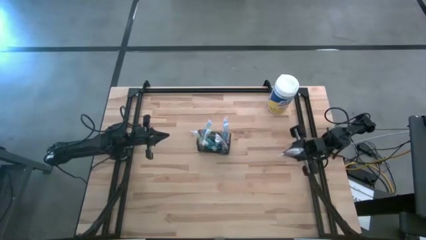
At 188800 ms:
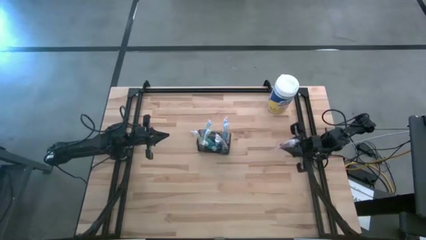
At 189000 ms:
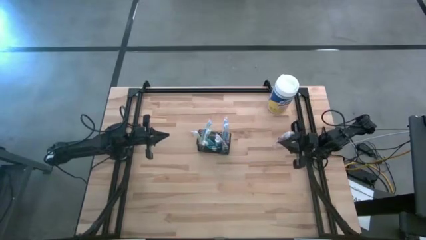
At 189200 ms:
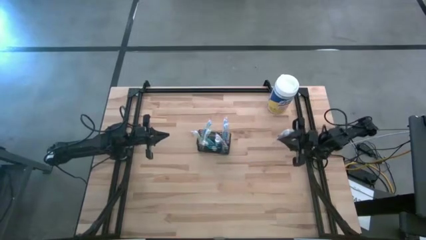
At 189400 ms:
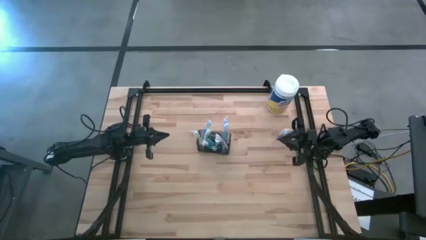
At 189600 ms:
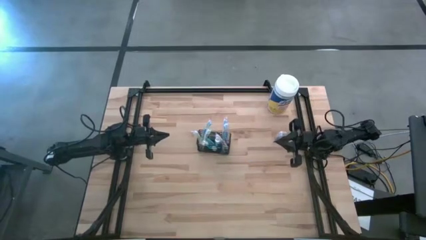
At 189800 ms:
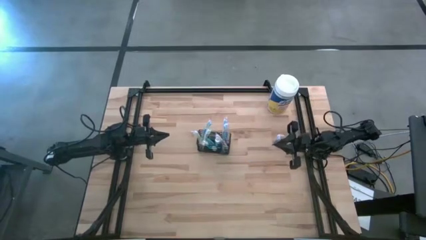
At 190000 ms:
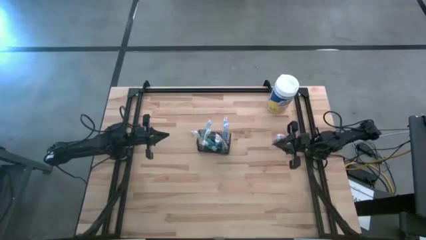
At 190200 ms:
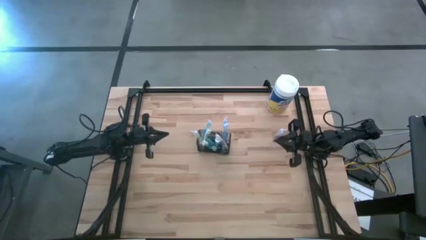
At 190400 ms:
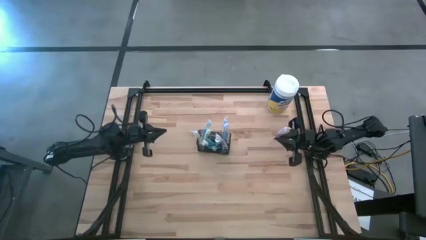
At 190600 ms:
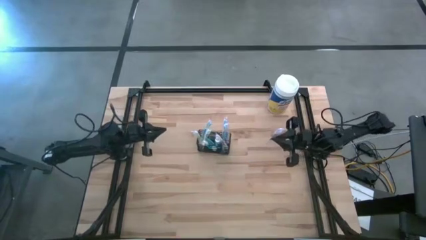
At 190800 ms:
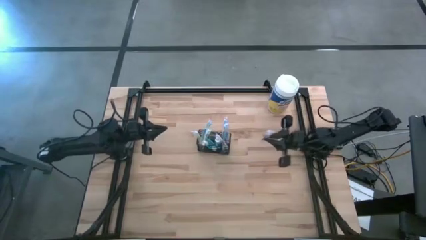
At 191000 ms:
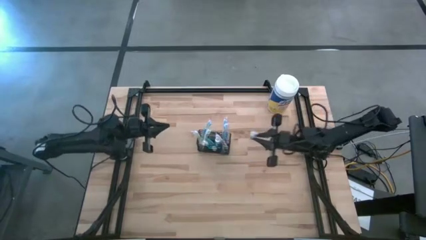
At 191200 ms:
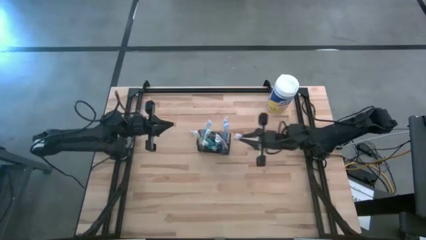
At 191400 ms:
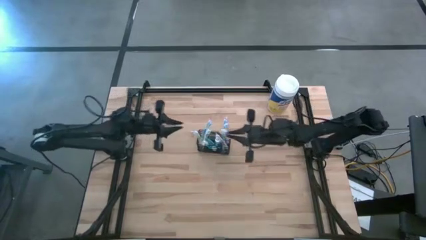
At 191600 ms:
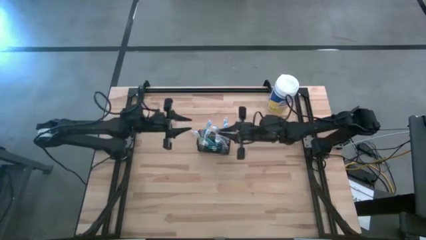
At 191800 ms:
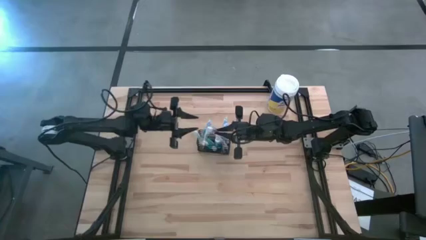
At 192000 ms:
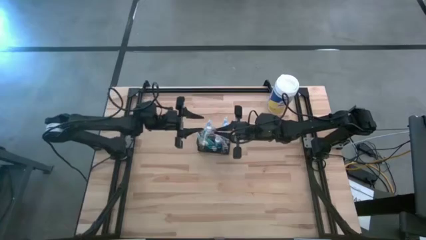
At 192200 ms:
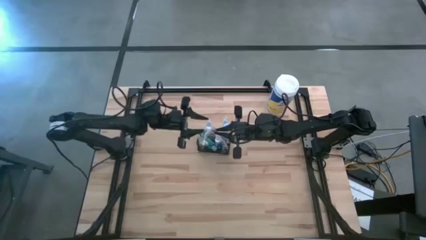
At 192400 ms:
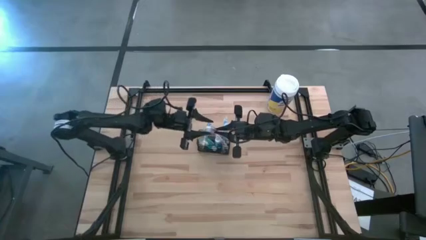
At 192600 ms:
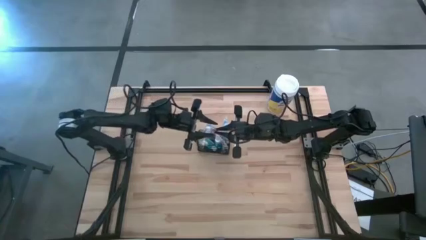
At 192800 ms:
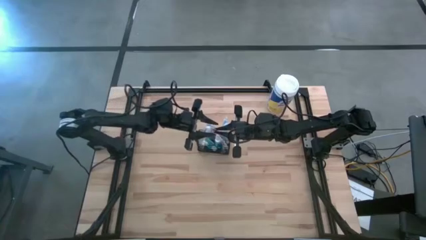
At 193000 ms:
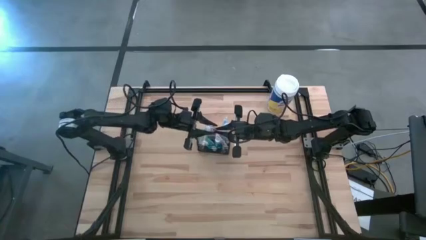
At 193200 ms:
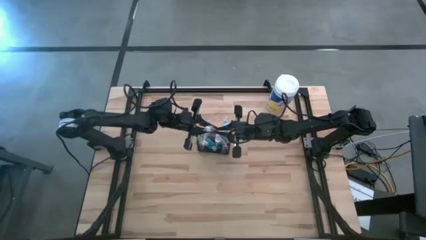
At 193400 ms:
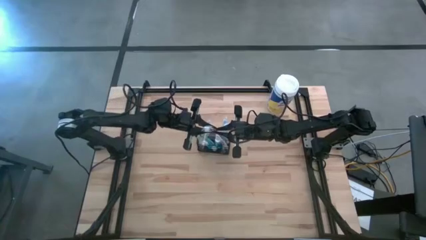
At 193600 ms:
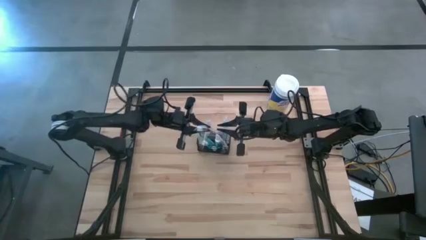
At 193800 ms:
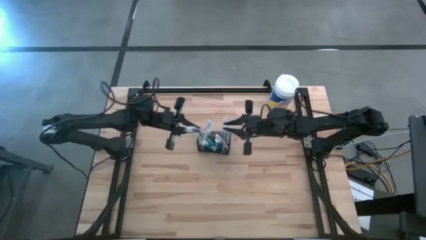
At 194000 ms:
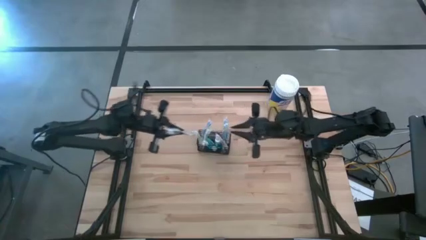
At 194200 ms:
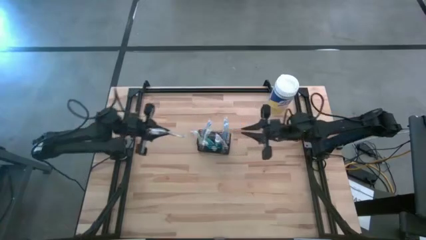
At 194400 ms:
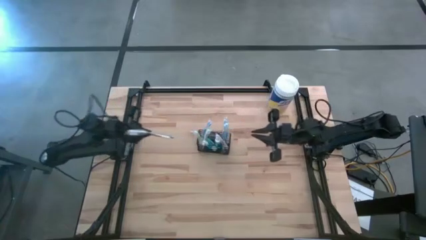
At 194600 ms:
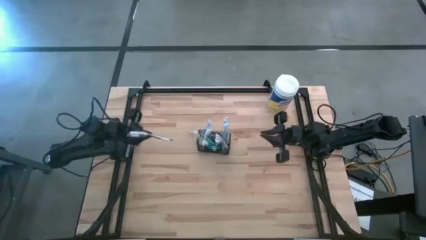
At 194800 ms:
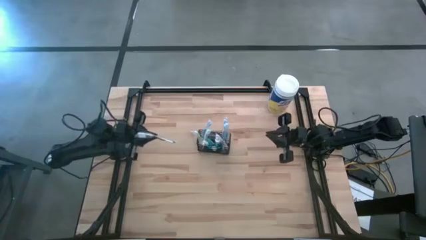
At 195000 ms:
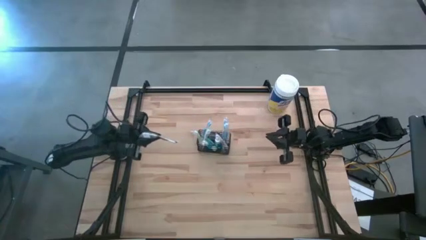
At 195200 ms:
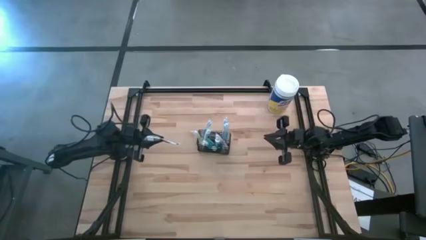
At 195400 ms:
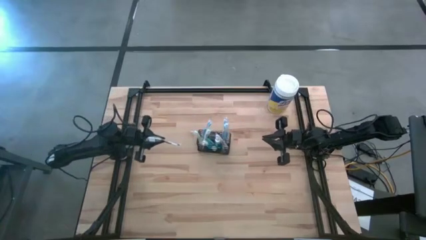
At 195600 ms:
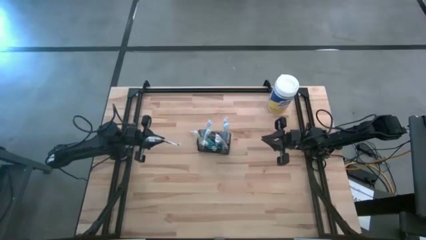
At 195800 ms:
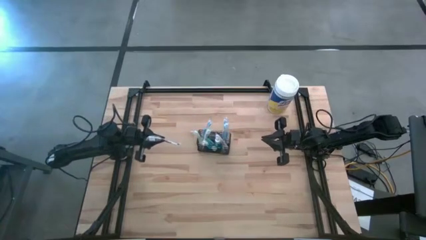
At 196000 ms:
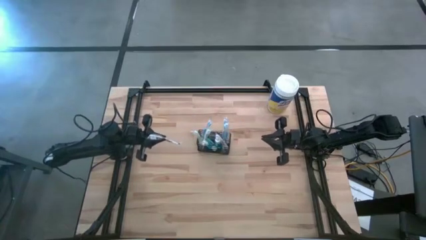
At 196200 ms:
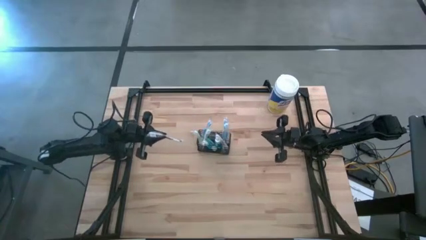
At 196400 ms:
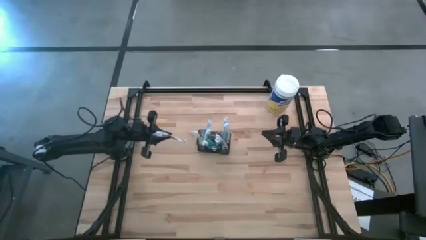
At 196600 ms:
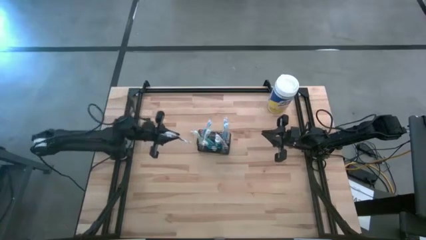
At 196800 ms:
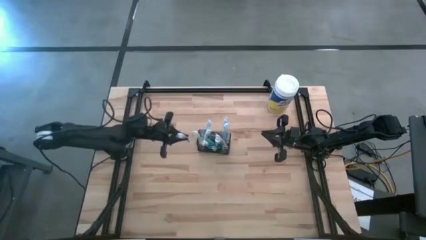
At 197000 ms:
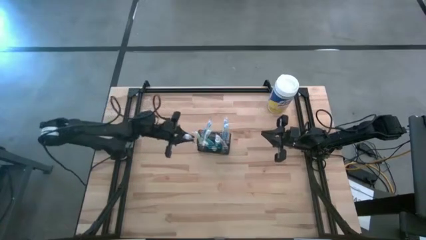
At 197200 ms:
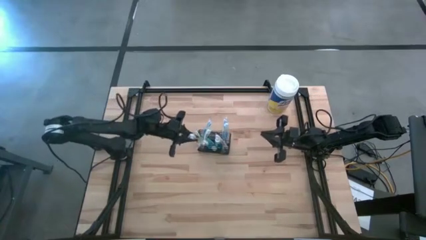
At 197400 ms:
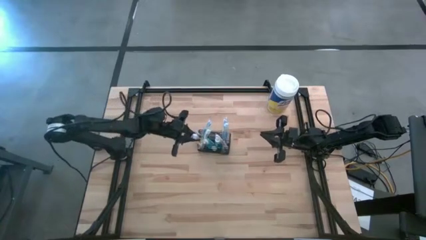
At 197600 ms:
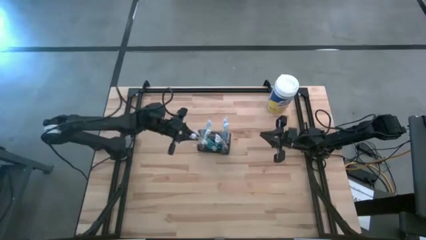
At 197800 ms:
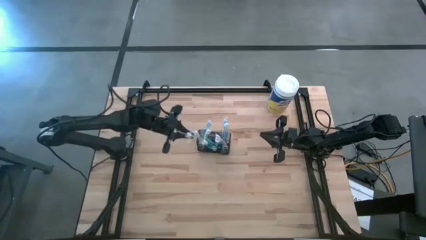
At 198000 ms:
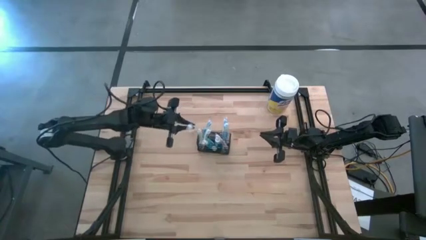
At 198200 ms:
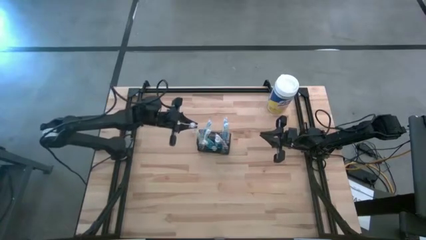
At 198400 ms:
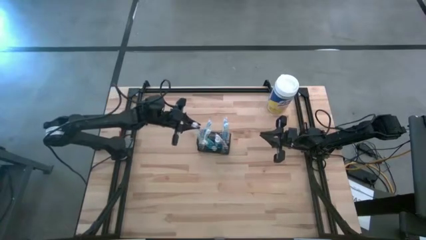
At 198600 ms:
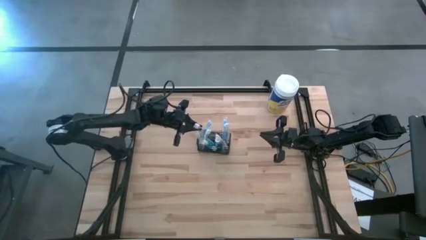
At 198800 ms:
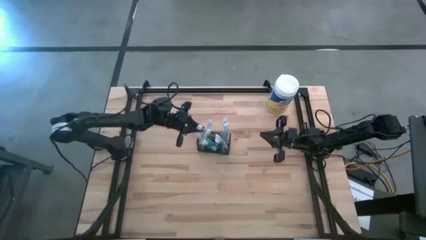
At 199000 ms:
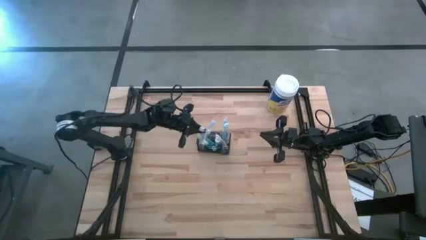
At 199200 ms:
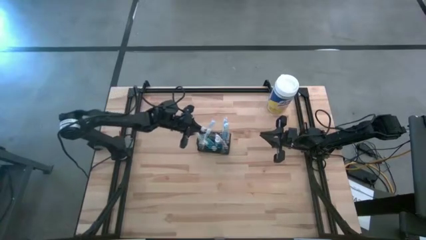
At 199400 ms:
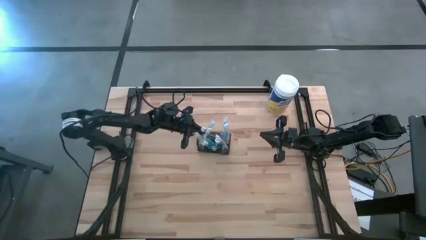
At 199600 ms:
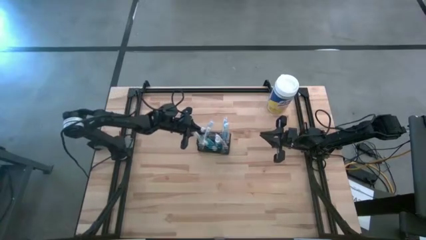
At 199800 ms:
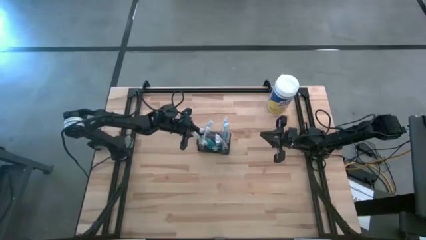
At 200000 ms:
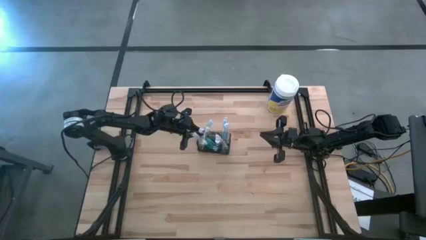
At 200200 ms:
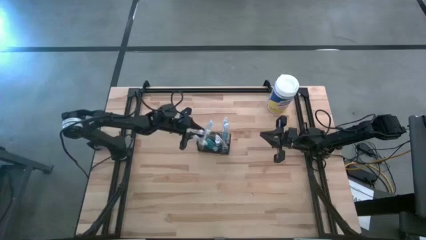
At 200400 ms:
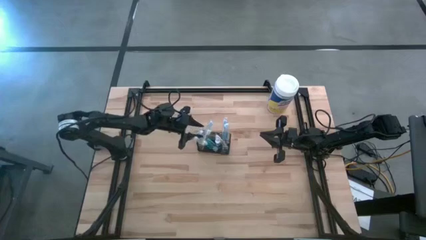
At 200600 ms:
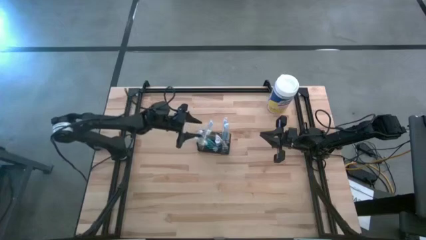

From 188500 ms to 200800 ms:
Task: Pick & Place toothbrushing station
Put the purple toothbrush into the black wire organizer

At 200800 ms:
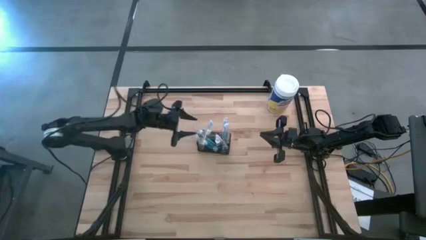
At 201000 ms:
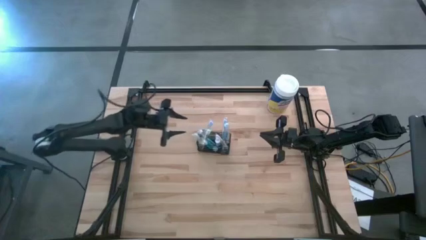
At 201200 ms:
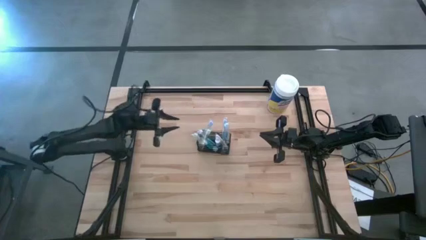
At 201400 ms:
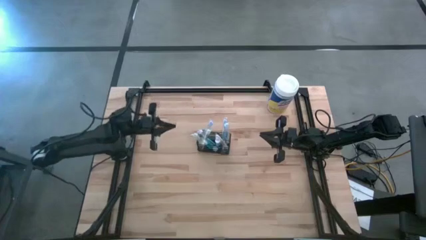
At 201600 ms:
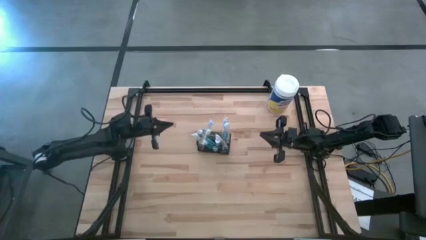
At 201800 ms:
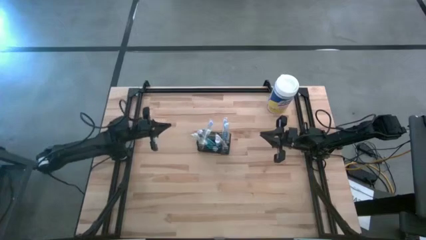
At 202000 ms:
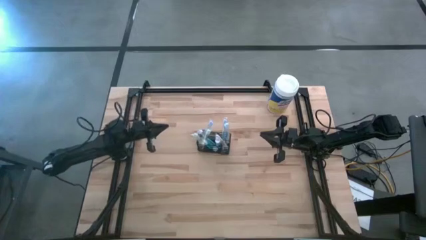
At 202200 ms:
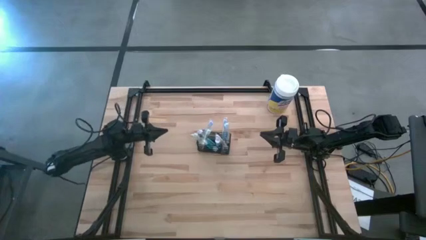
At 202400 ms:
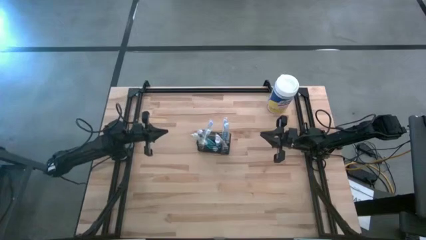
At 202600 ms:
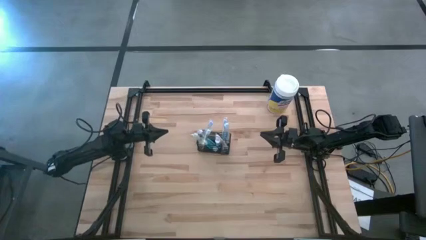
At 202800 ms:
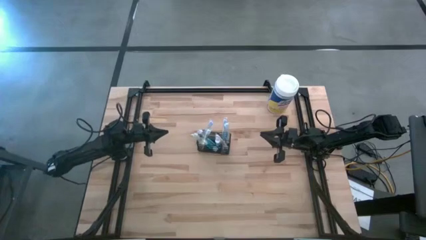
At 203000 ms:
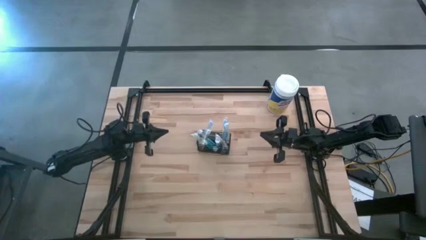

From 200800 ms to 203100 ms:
Return to Home Position

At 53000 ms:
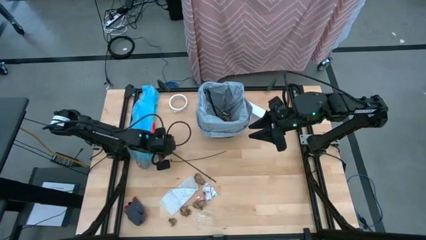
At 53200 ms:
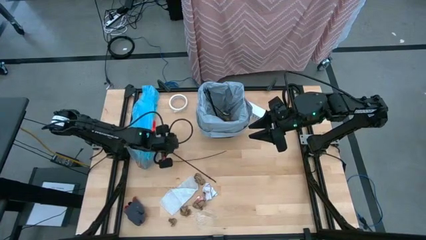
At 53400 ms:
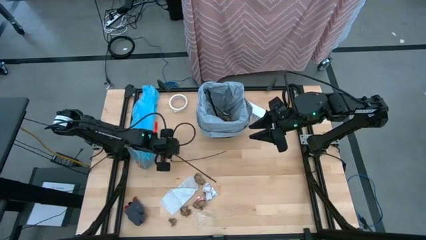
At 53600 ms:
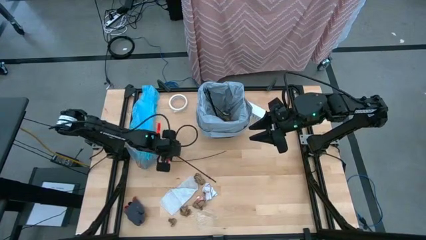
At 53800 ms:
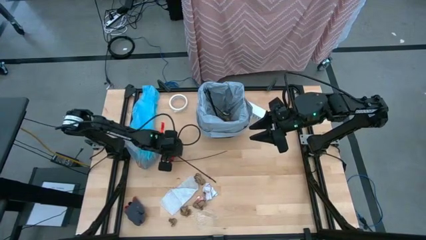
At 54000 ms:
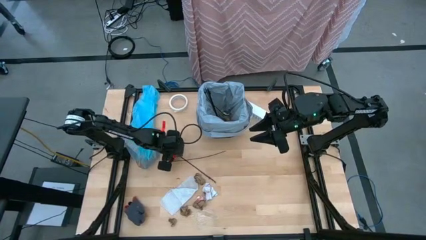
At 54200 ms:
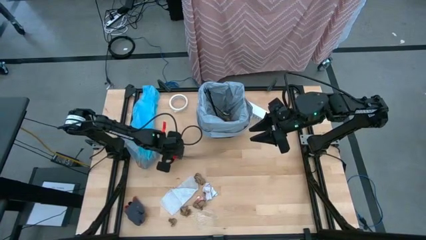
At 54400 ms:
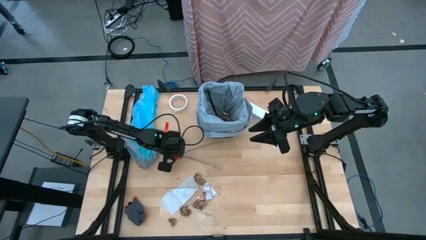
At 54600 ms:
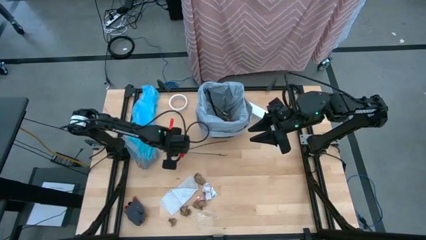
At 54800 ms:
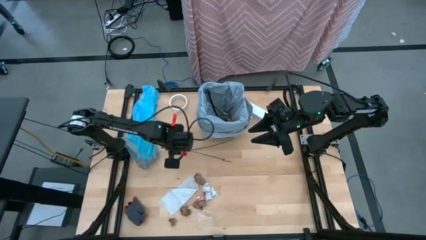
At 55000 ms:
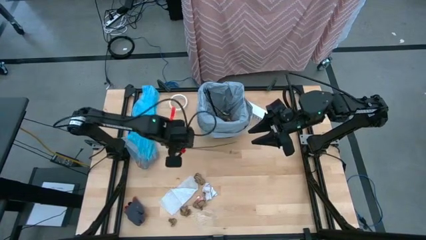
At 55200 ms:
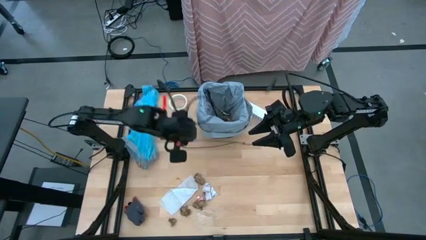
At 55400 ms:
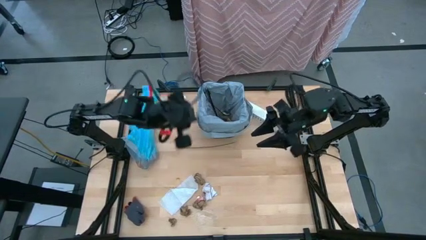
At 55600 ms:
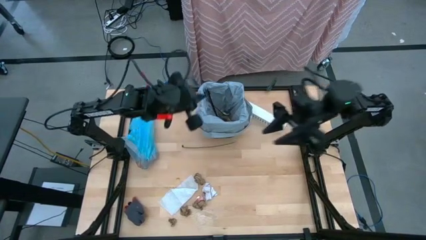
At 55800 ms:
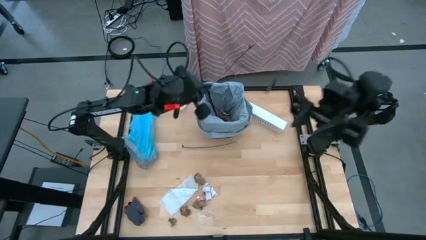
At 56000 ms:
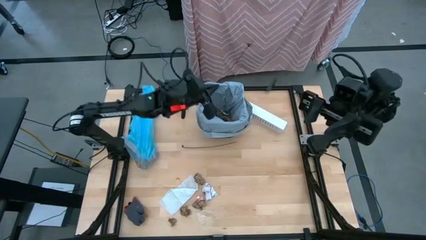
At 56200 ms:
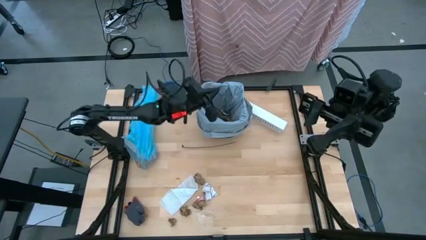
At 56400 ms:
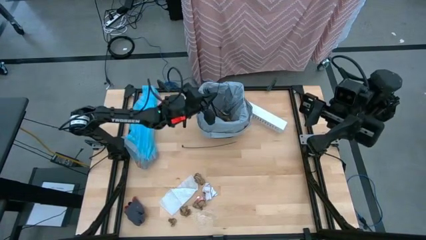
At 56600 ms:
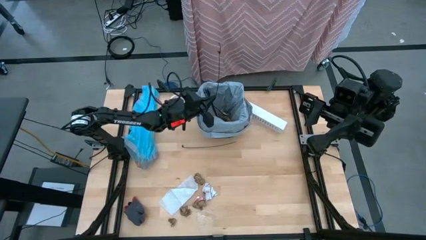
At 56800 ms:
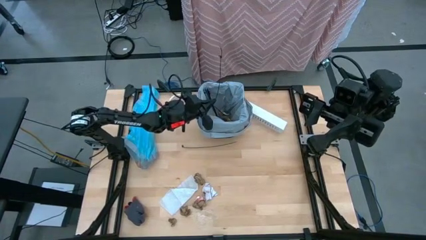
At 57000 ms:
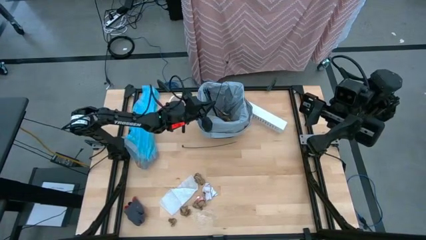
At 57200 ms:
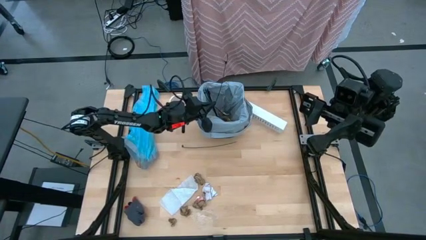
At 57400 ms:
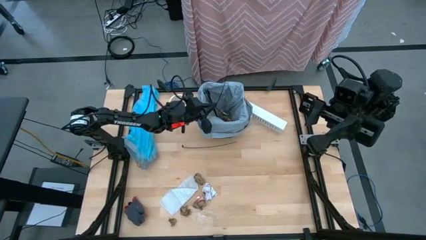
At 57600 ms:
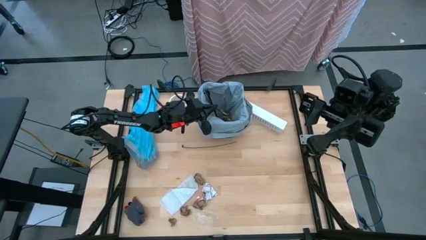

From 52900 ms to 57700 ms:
Task: place trash/remove bag and relplace
Put the zip tie into the trash bin
